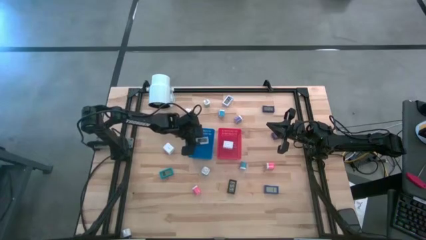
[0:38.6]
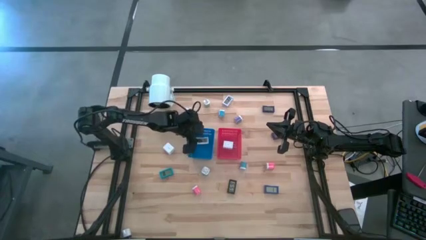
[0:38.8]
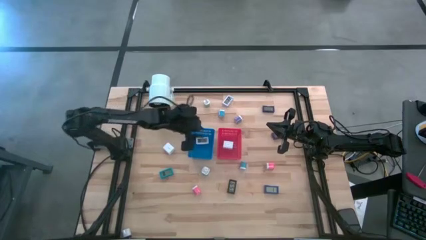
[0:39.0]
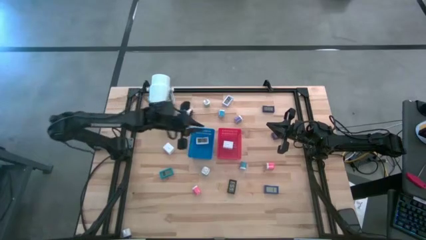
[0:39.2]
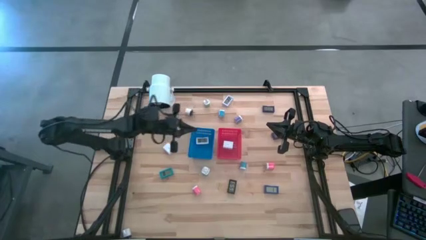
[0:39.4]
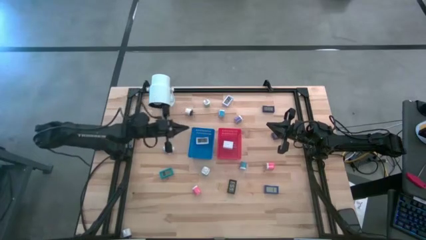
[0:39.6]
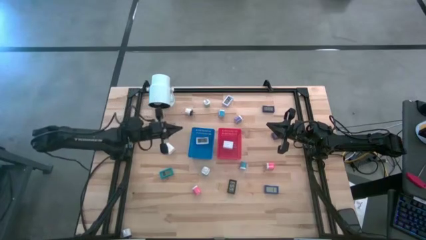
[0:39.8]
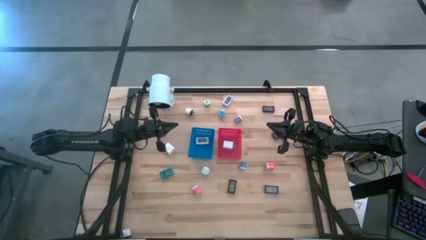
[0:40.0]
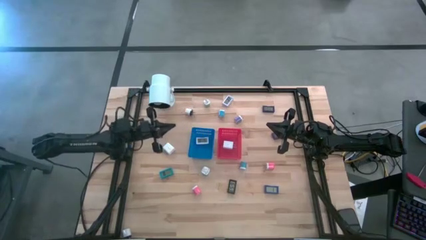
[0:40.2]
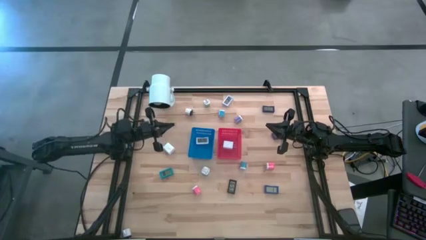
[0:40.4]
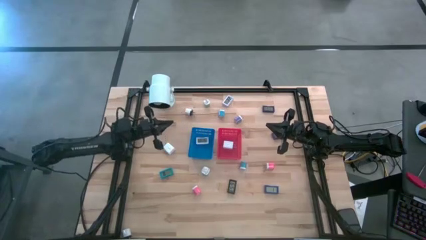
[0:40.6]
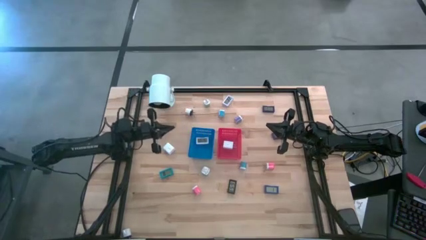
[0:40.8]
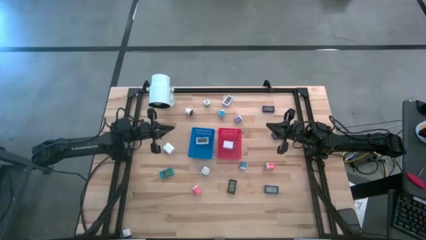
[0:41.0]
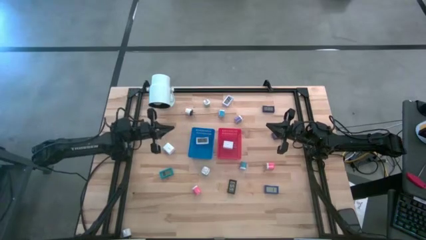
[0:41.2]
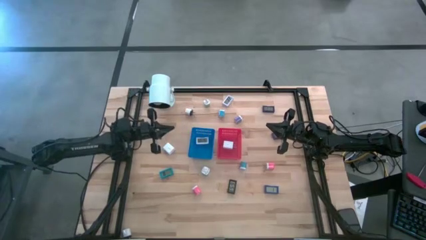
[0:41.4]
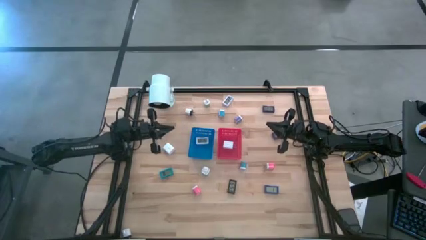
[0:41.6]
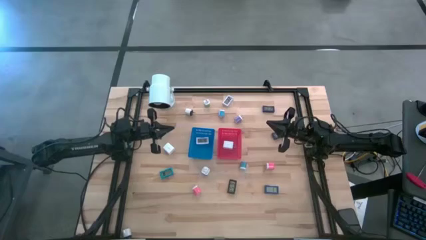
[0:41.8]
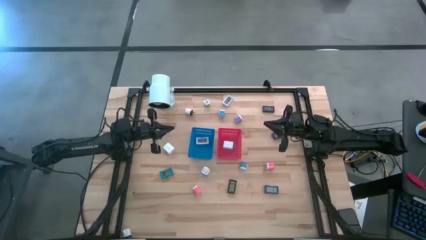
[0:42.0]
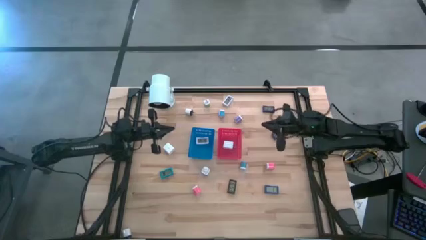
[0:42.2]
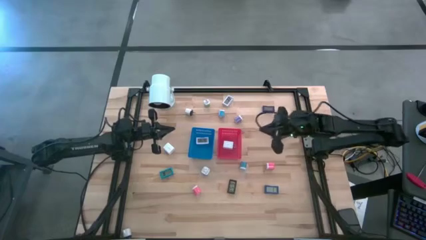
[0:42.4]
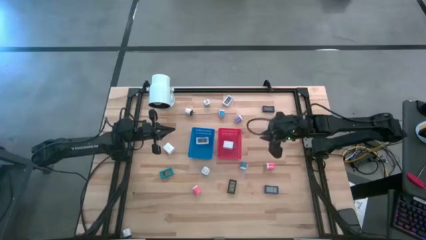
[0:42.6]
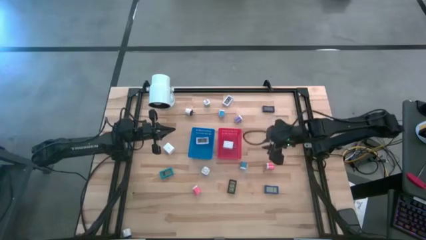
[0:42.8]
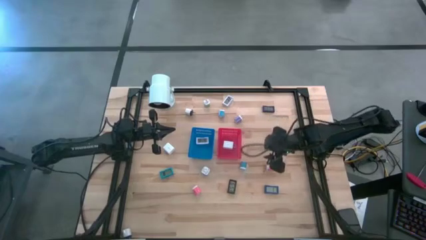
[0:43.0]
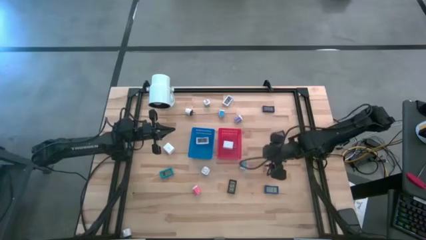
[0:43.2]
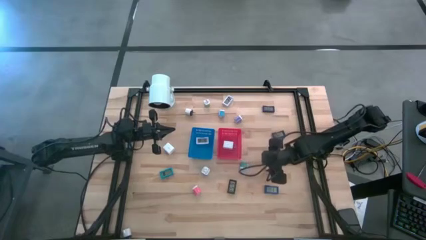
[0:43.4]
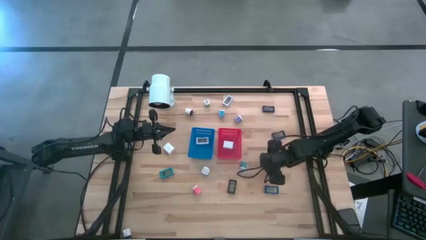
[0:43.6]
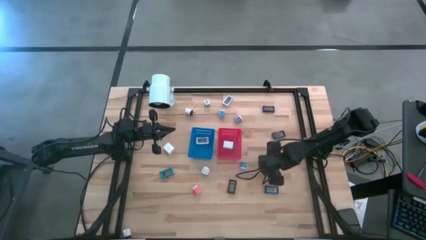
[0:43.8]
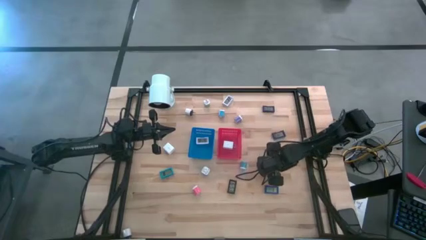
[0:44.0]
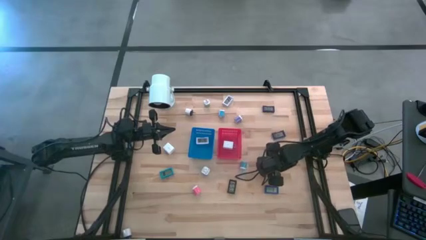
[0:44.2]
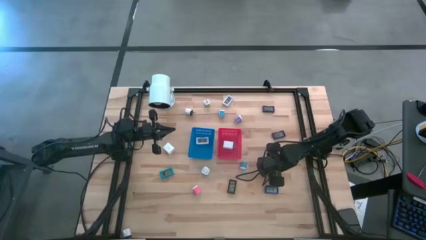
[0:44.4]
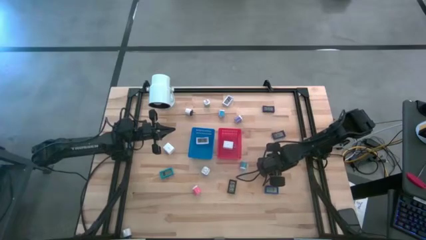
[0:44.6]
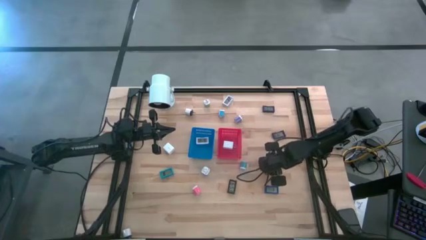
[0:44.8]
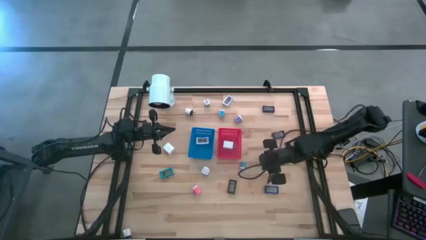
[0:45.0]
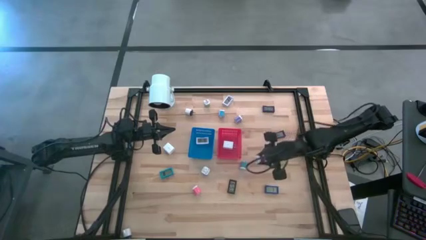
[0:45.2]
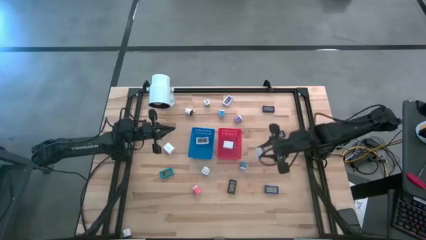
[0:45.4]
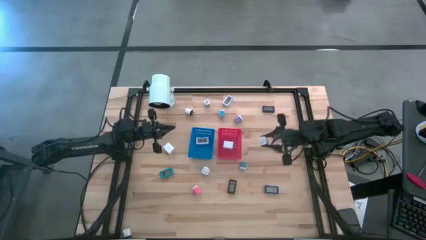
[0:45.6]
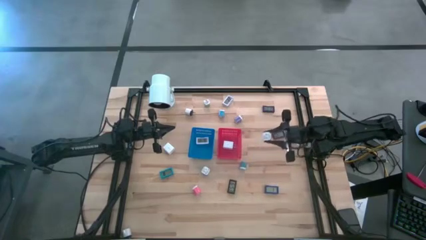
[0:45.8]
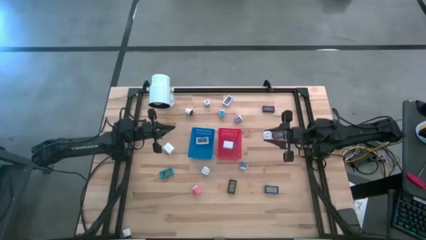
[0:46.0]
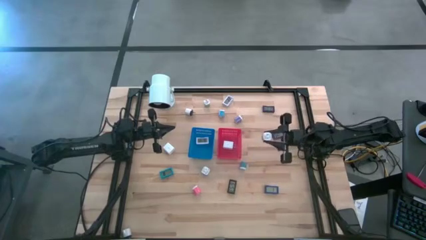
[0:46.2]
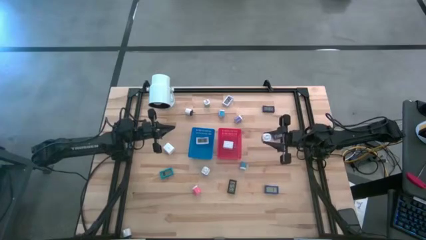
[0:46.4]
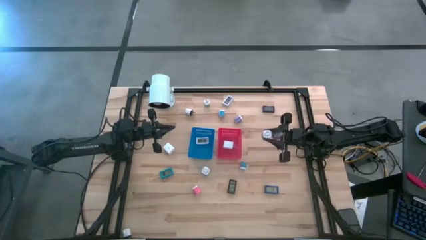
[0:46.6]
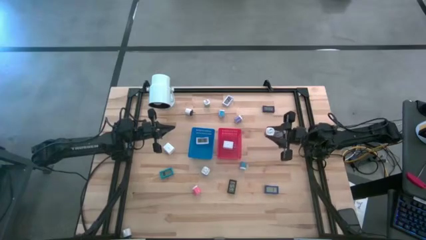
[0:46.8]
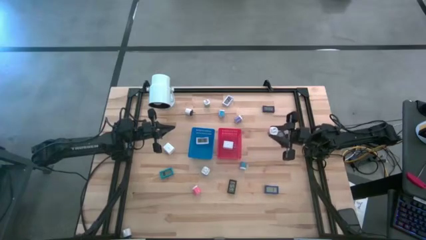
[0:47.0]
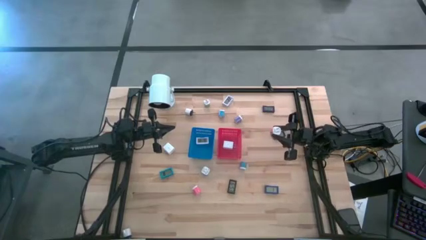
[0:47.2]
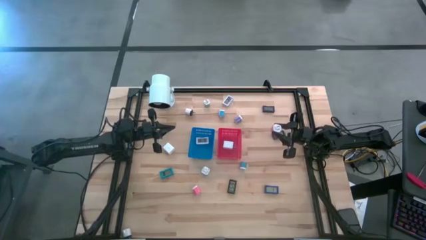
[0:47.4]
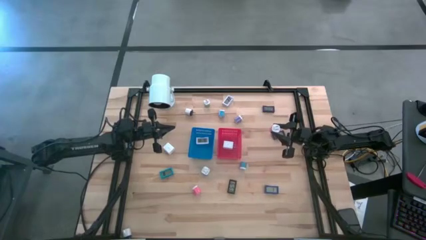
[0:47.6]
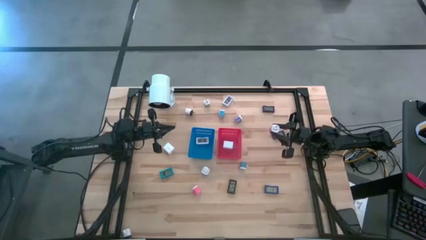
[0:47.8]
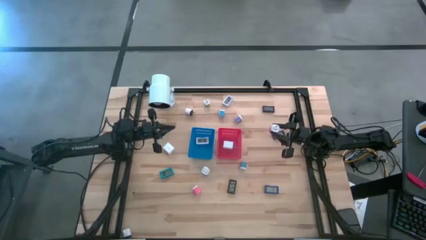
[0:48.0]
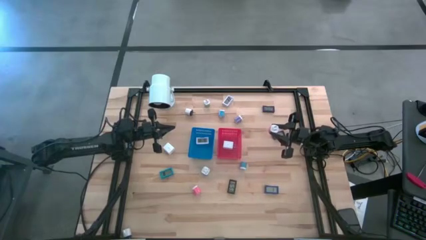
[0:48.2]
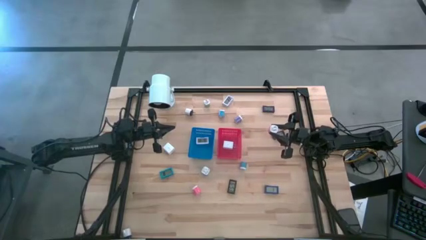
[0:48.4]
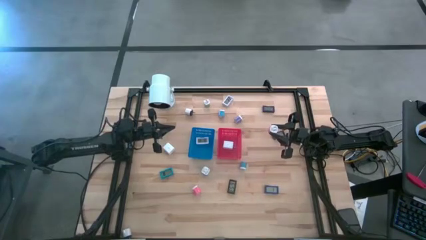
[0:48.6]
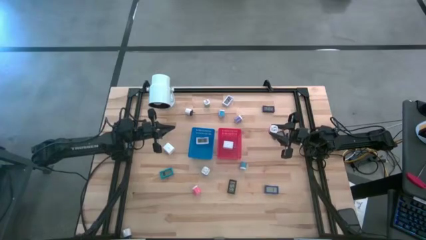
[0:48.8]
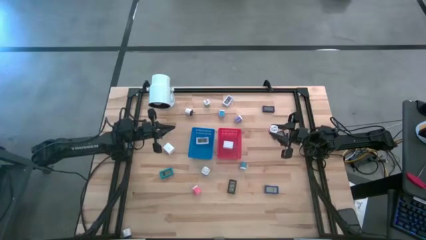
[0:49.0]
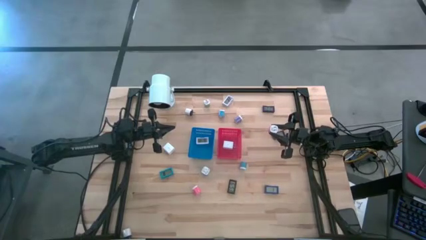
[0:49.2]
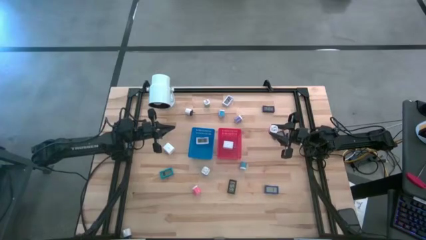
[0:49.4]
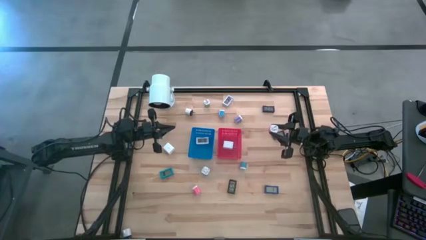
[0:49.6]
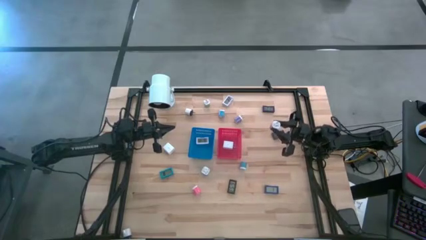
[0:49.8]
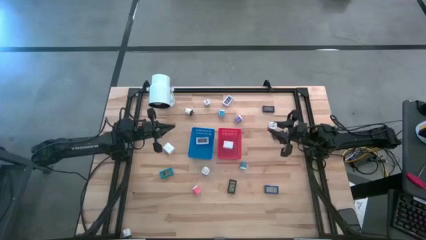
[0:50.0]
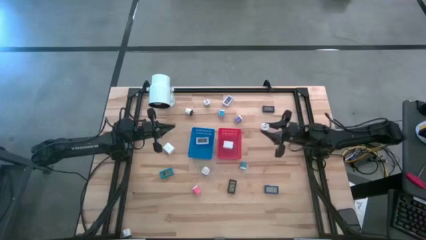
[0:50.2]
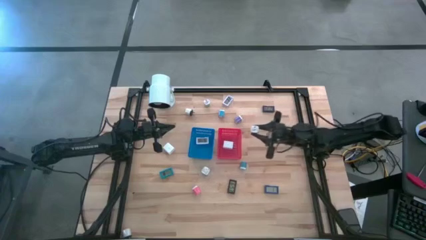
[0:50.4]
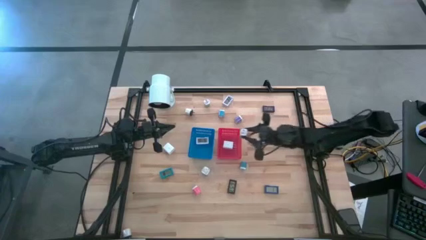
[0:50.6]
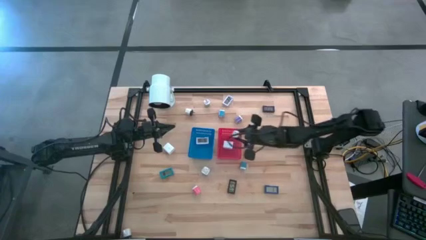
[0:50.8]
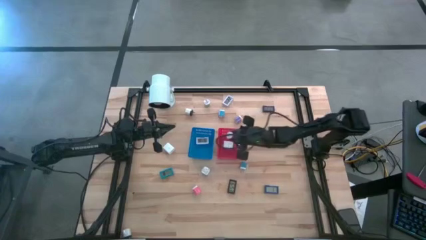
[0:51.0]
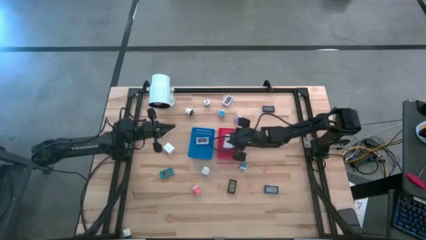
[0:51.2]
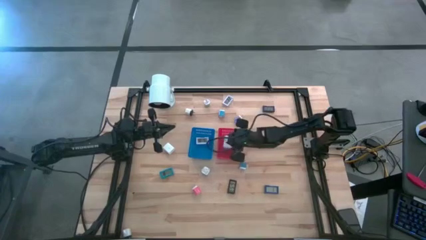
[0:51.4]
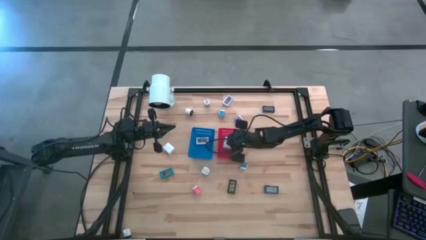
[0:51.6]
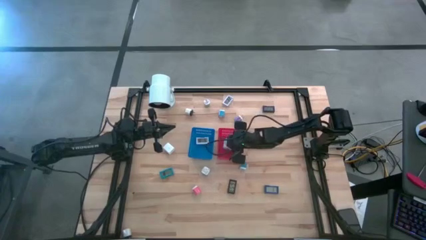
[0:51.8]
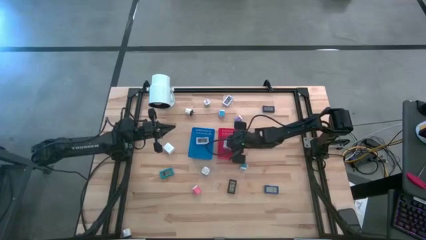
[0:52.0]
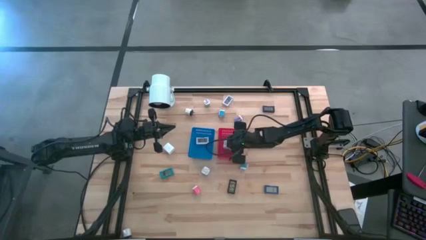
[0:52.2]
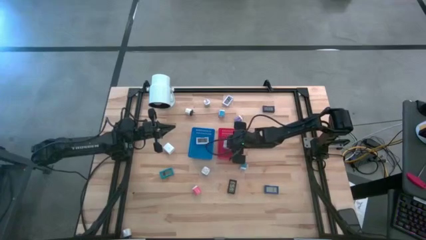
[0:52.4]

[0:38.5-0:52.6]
Task: Pick & Place Office items
Put the pink charger adapter into the red bin
